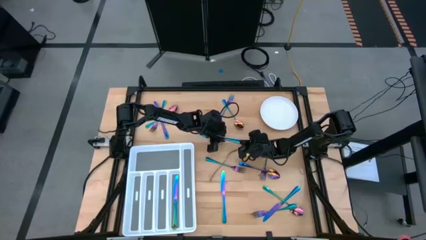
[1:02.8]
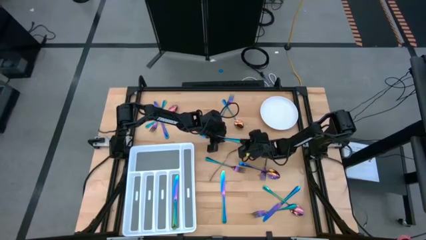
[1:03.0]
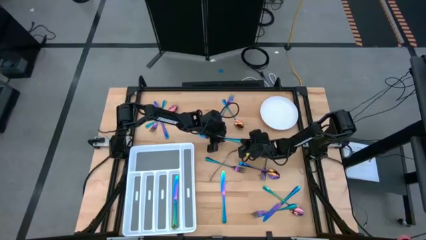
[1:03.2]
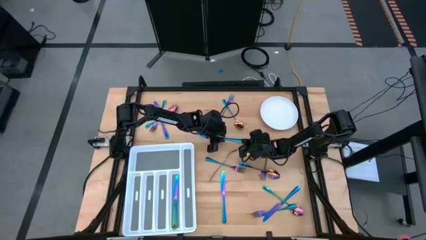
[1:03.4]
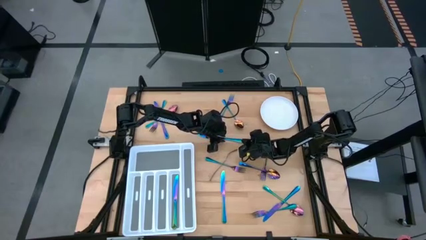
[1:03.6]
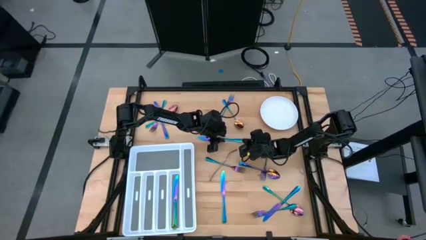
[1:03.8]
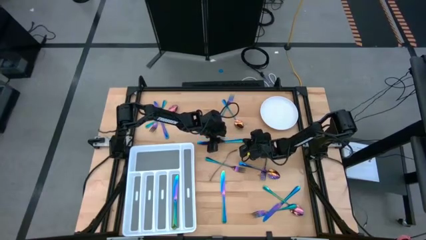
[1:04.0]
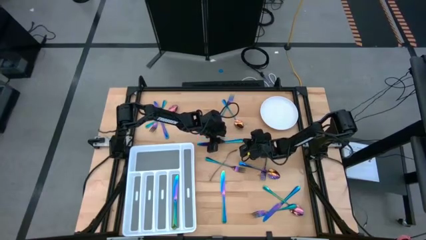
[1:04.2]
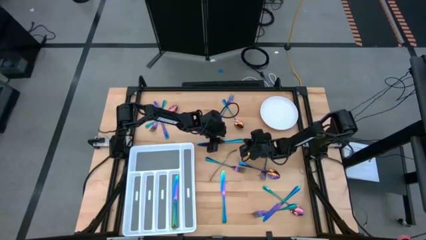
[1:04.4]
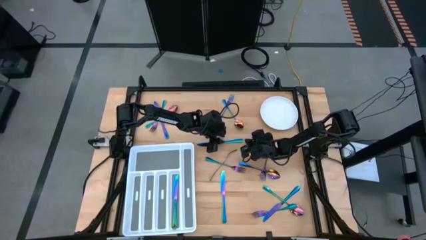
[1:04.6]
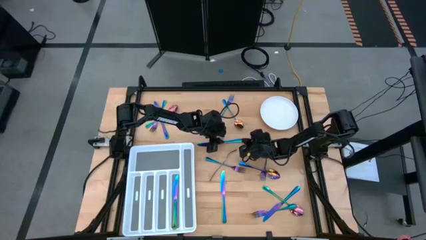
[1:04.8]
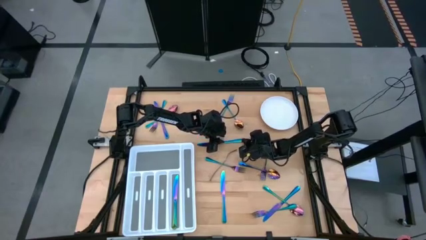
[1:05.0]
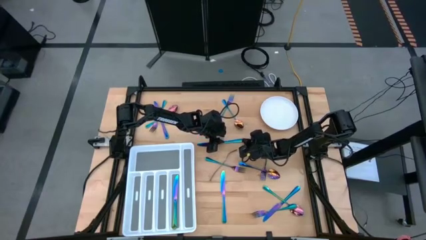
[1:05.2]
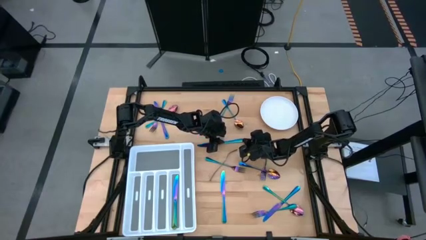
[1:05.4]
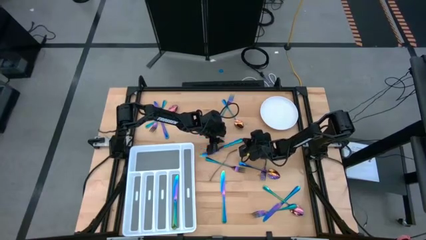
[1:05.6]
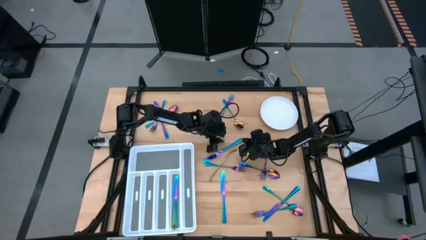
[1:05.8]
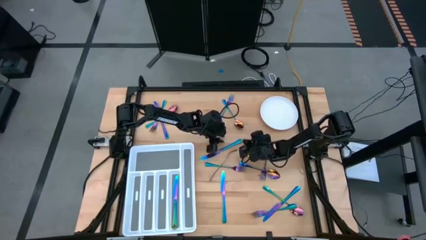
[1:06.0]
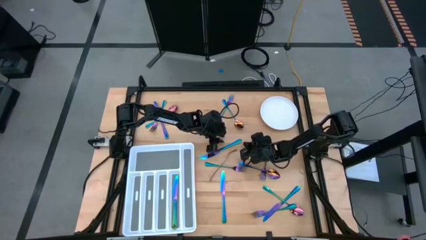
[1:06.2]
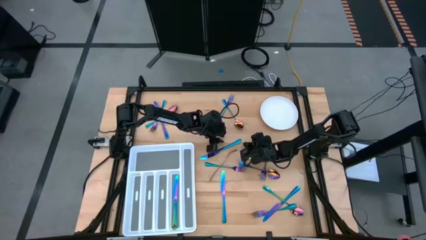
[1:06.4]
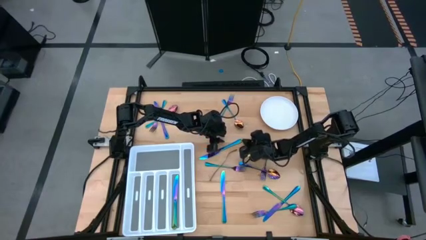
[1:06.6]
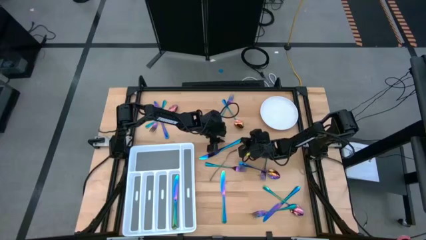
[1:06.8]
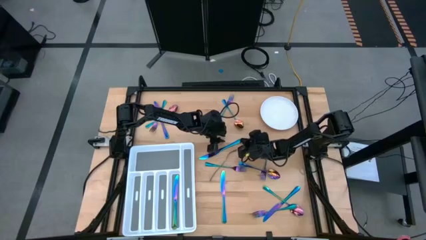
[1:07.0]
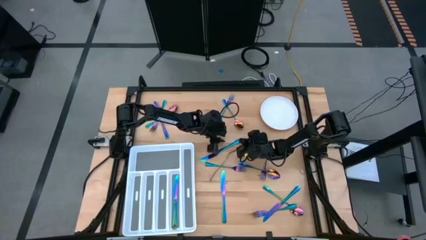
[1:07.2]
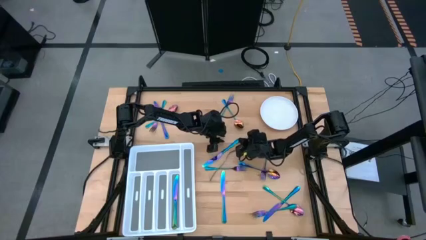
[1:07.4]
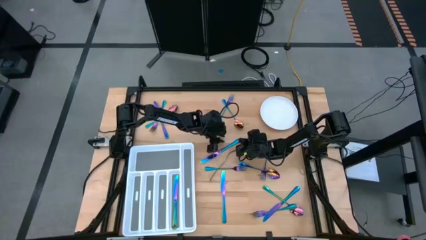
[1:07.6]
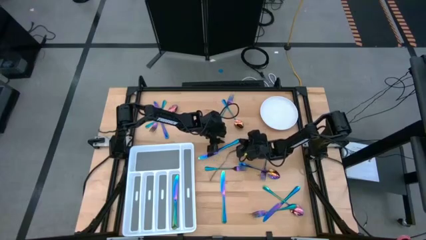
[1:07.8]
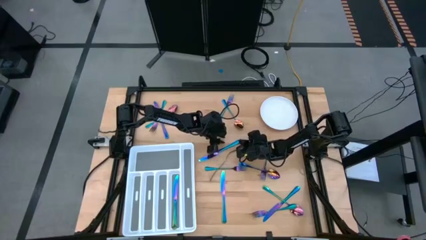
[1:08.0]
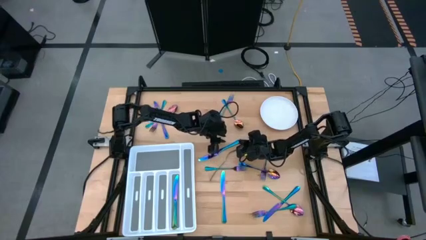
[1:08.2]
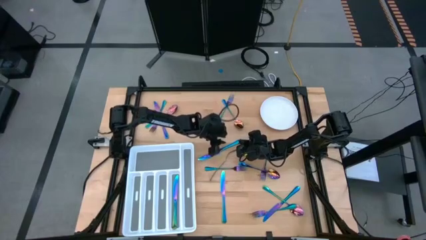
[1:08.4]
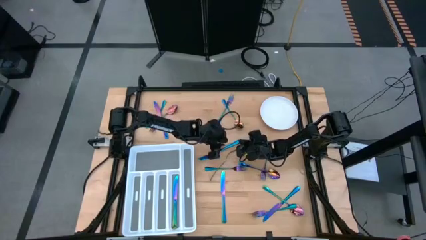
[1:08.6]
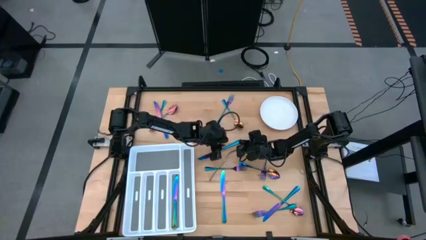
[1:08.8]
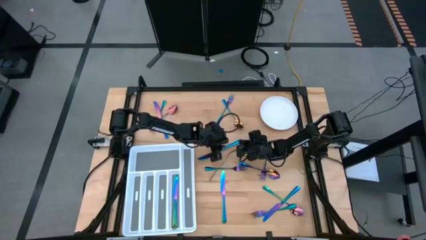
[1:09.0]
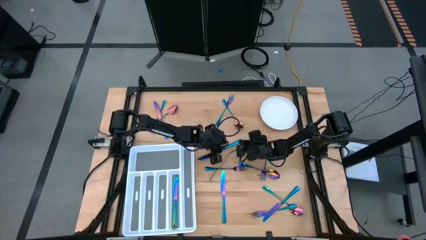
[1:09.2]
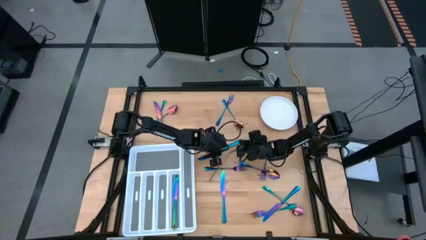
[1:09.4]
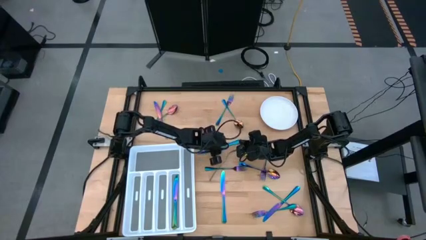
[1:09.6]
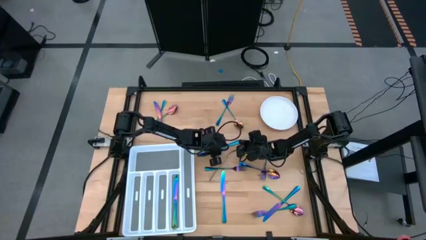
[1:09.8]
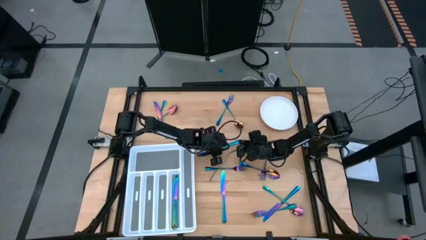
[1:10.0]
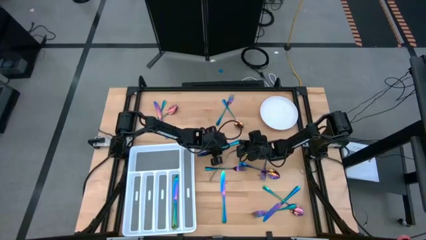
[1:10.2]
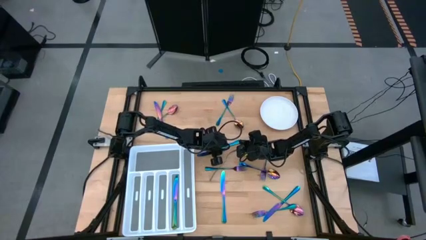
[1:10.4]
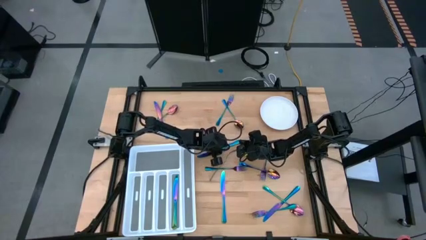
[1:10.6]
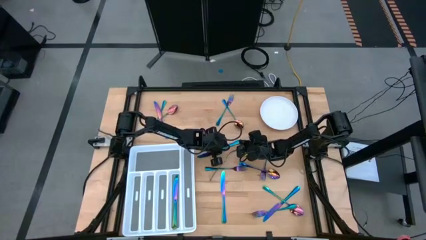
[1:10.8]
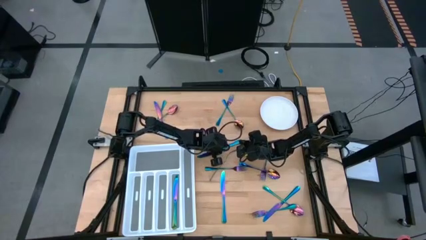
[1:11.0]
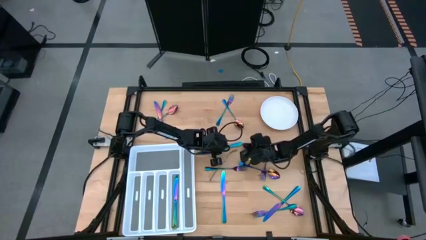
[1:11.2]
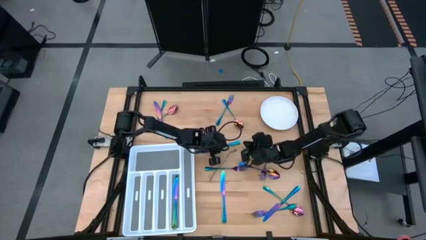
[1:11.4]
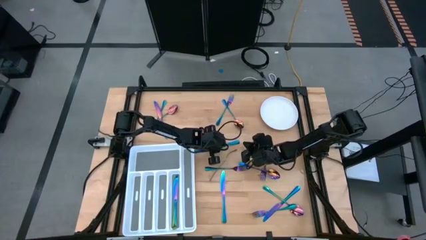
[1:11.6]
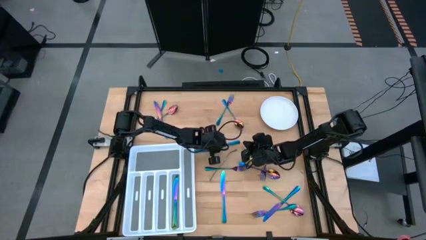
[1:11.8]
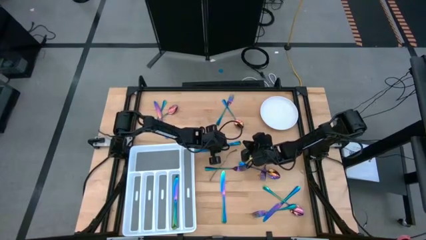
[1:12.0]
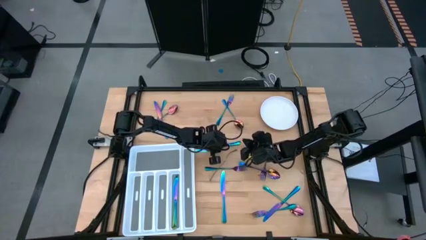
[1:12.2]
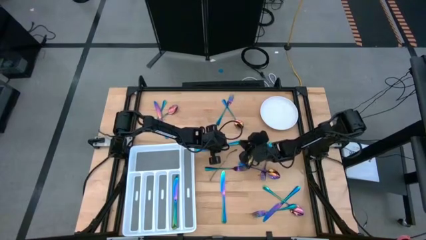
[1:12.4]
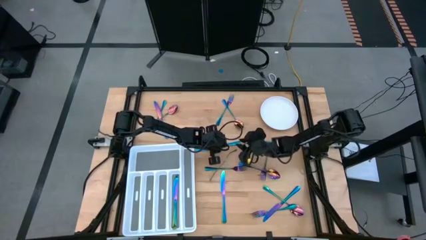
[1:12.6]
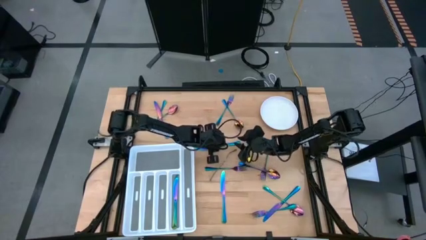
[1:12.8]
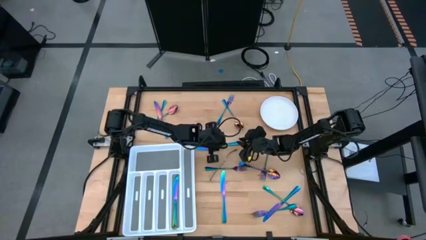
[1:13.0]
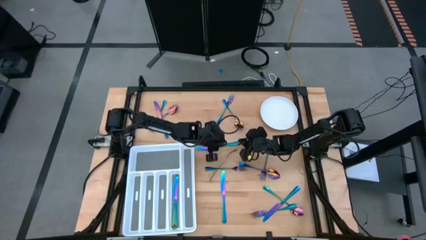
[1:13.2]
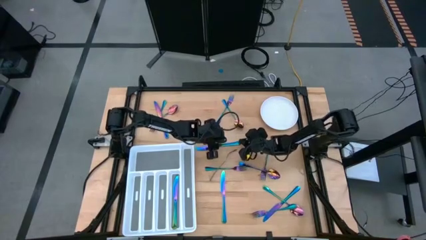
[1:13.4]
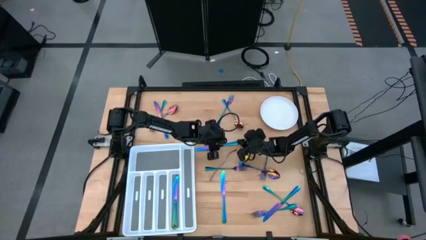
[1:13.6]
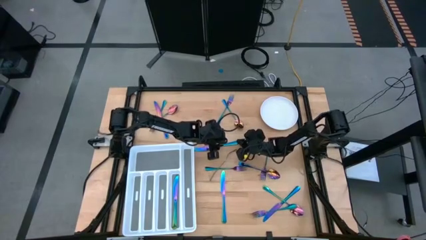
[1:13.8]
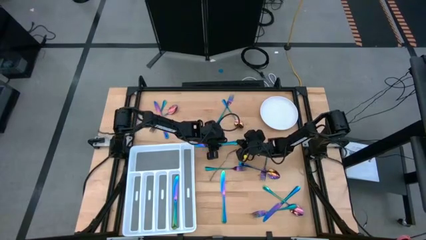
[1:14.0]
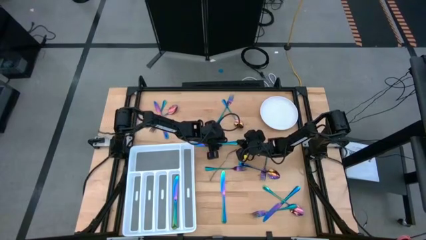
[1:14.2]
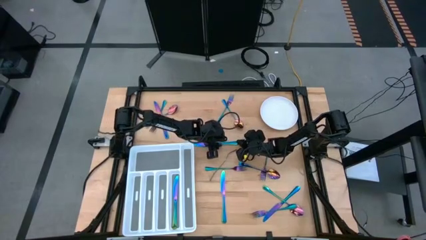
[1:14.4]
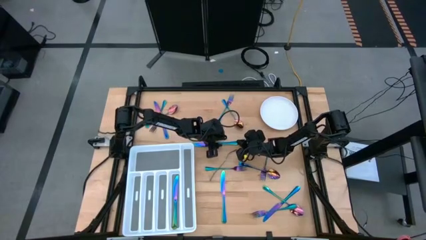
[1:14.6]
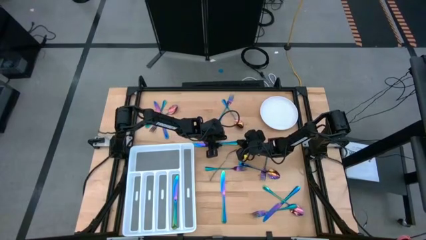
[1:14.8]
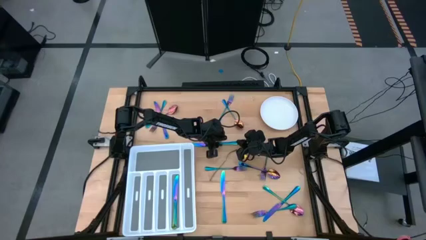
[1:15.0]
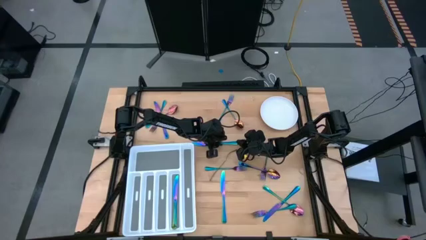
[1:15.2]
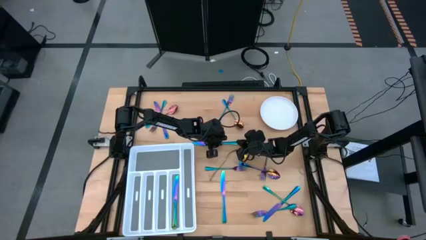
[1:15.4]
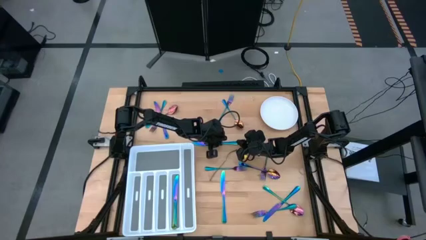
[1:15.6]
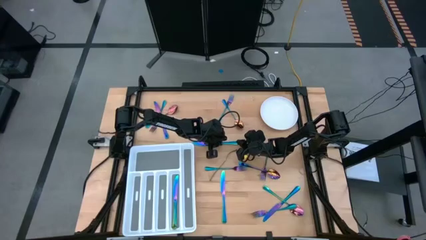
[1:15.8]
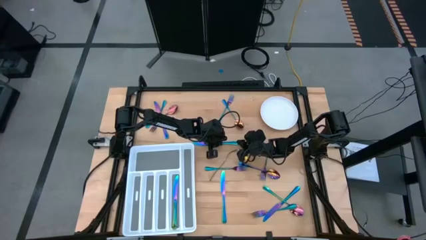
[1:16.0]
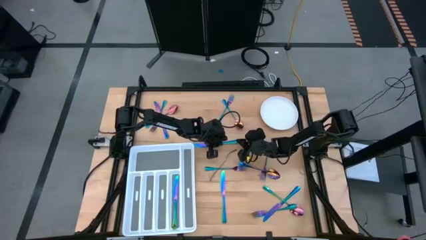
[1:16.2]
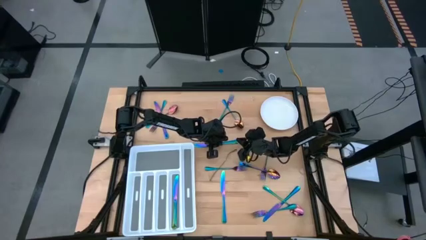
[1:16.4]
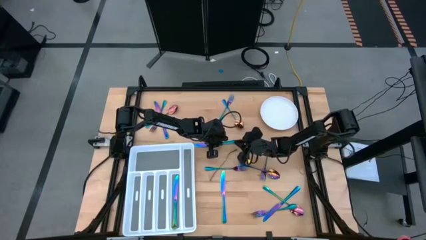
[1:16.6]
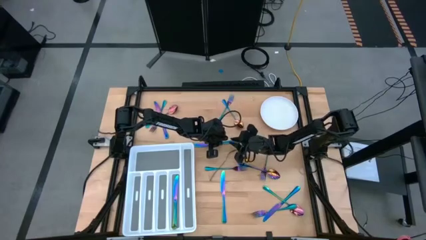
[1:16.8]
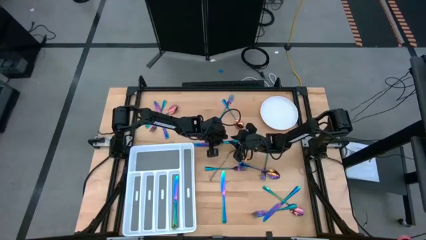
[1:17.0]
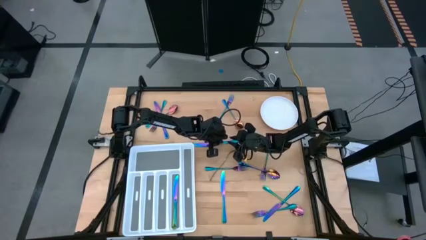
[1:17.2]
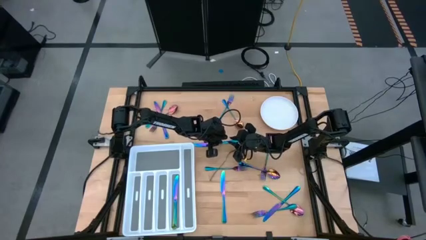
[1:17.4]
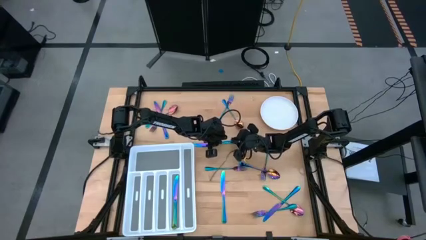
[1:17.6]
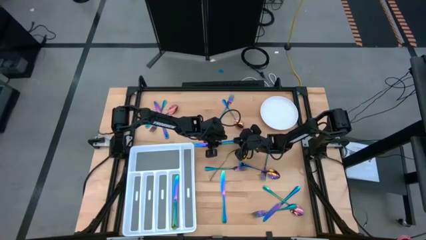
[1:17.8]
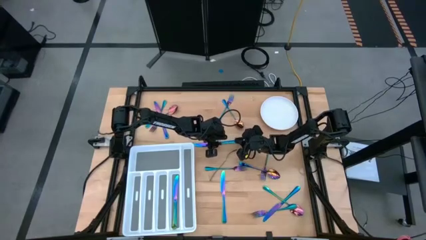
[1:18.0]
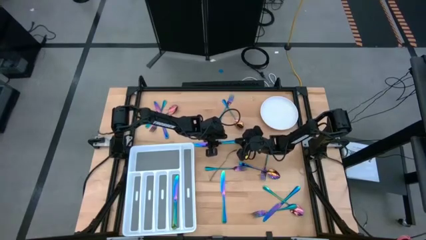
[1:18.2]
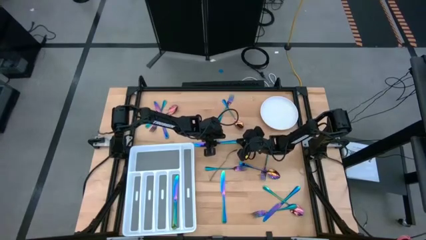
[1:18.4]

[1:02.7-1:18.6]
Task: Sort silverware
Put the top right iridescent knife into the cutlery tray
